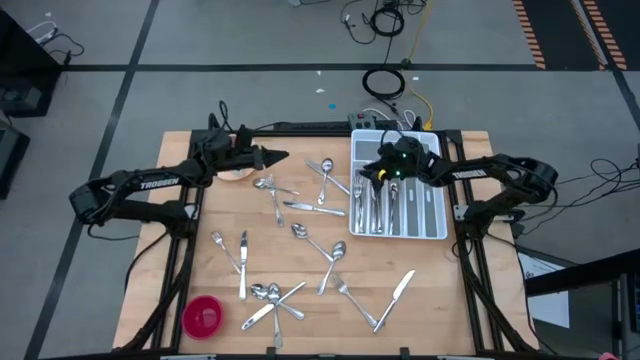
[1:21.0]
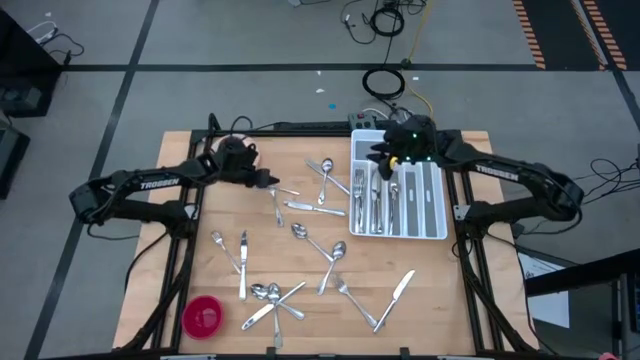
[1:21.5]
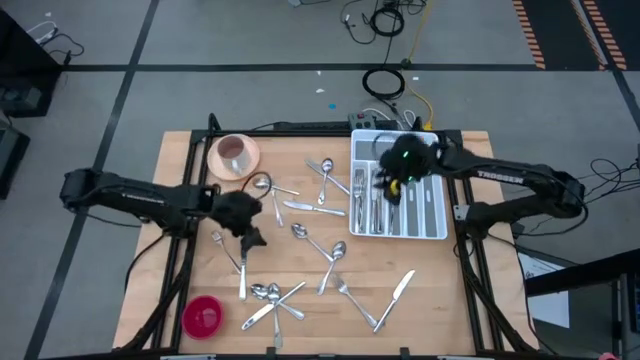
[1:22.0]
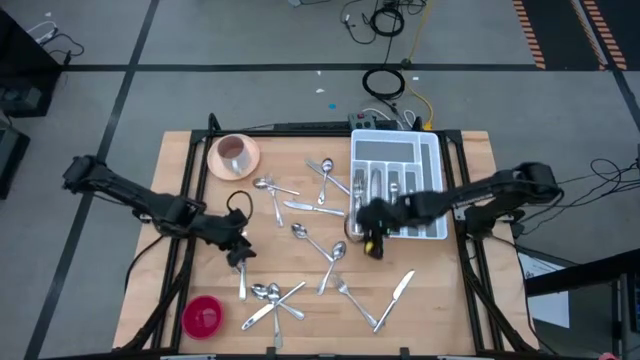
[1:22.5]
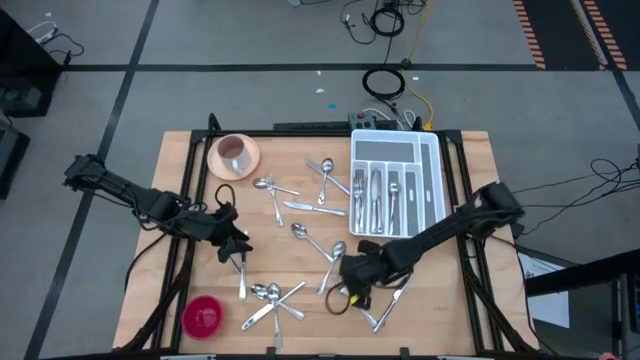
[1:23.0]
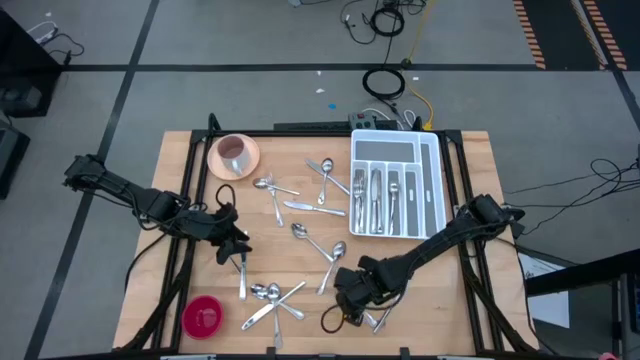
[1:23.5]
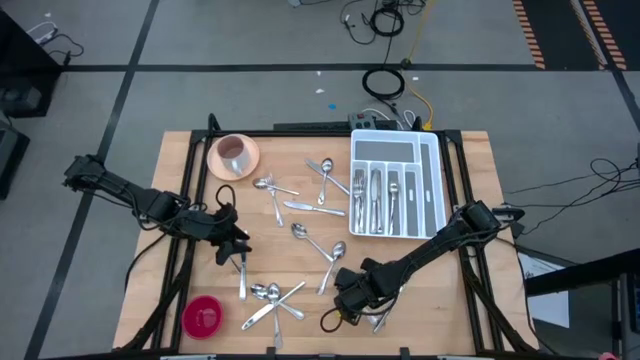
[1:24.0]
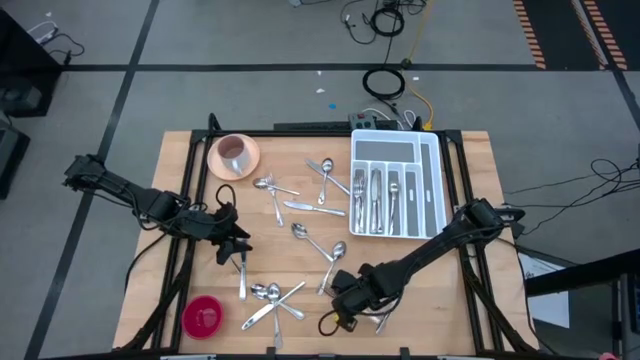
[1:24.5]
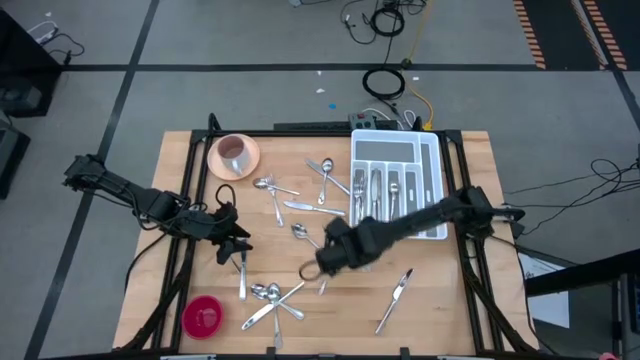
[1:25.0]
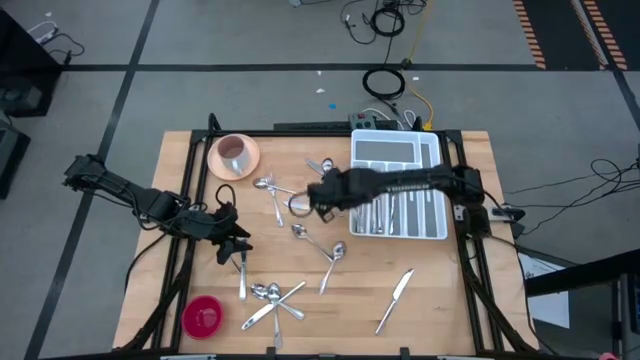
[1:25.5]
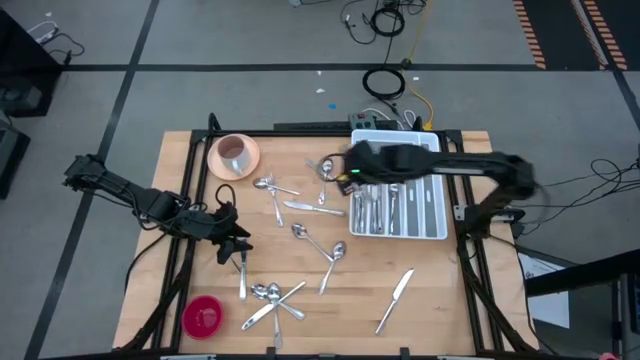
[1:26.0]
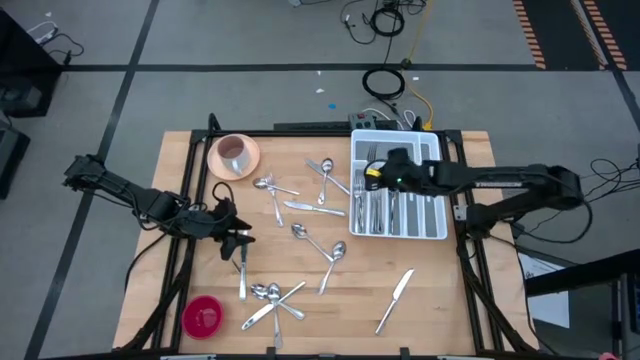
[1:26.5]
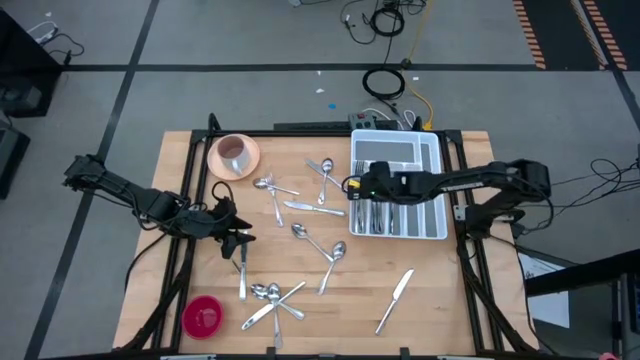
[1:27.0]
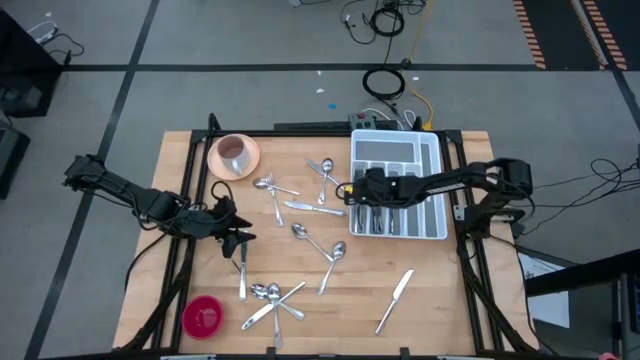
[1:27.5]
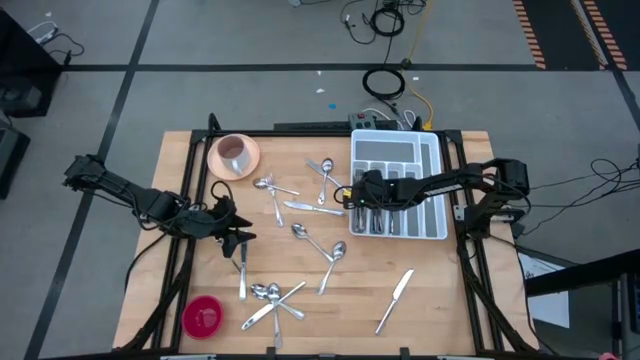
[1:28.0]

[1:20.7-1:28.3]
Task: Sort silverware
Put the bottom silver fork into the white silverware tray

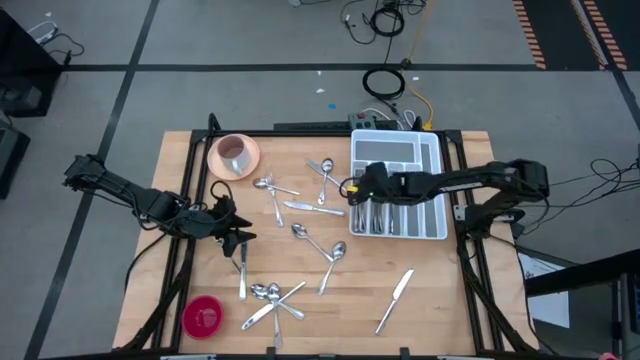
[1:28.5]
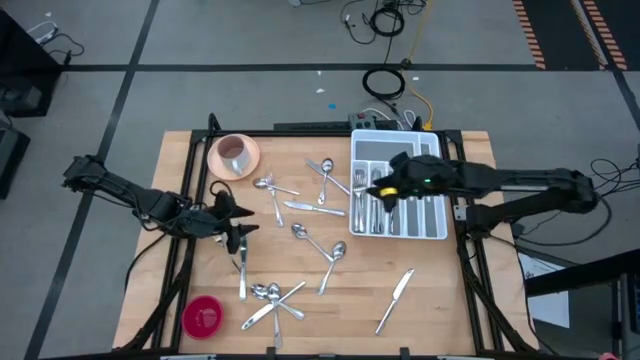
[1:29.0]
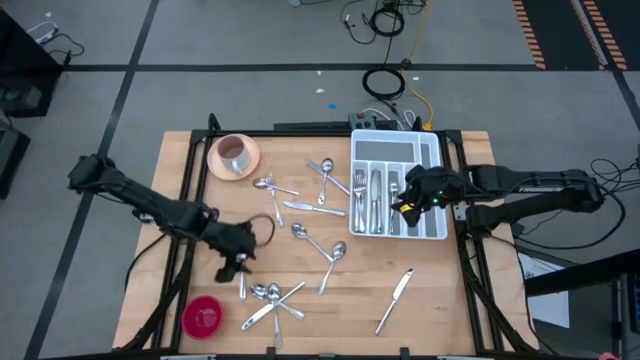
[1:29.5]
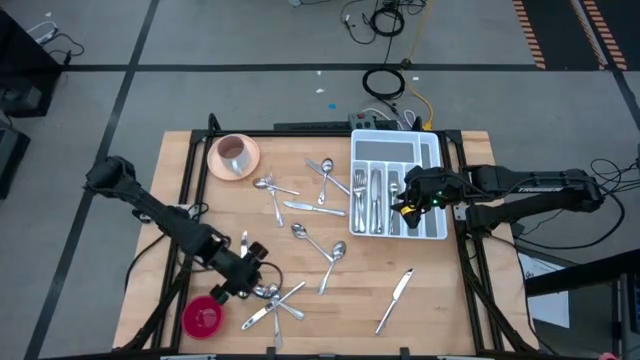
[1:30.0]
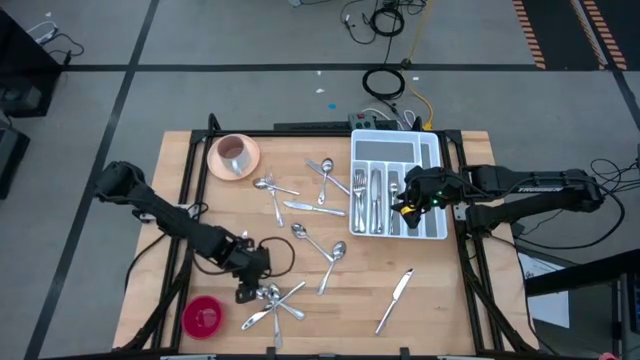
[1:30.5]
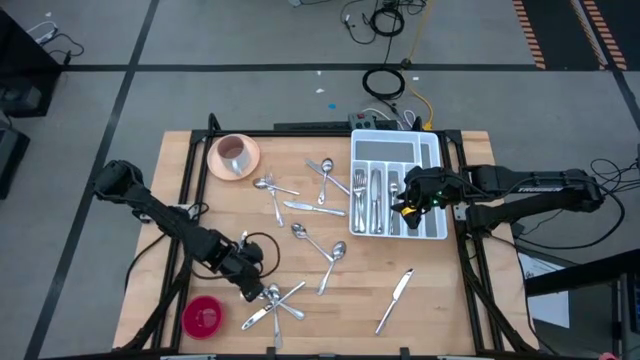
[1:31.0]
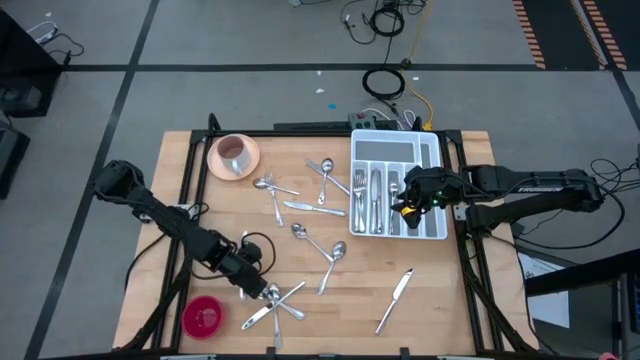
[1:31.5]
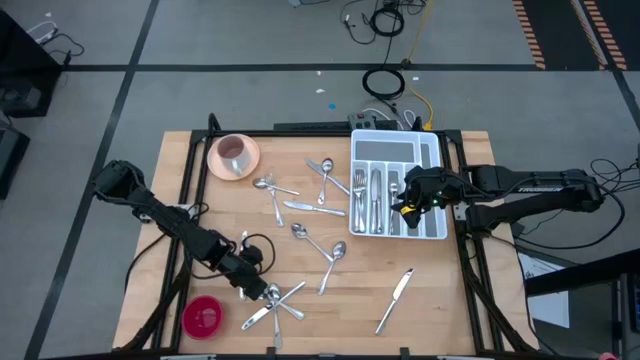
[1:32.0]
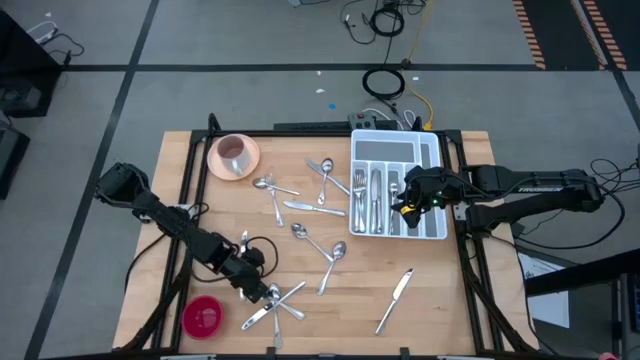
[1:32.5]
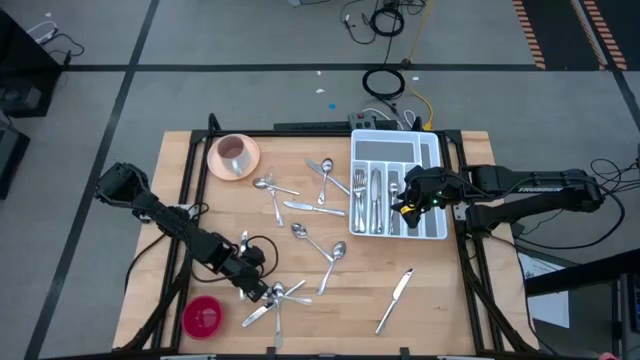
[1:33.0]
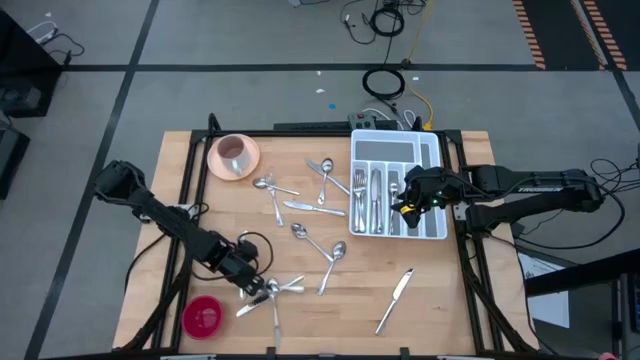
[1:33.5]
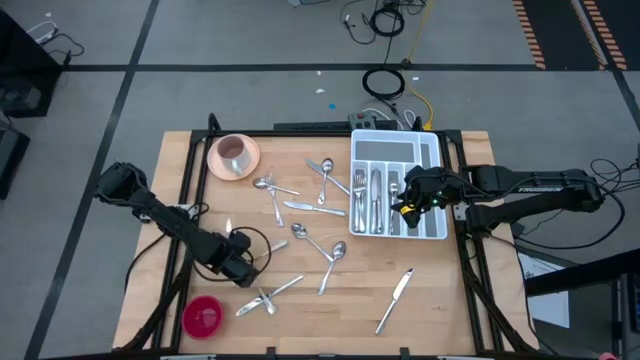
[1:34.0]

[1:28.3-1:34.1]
Put the silver spoon into the white silverware tray

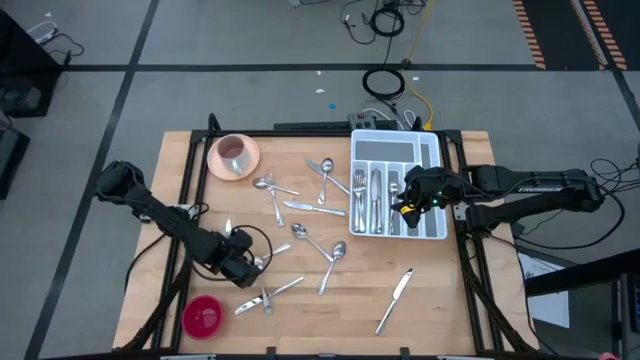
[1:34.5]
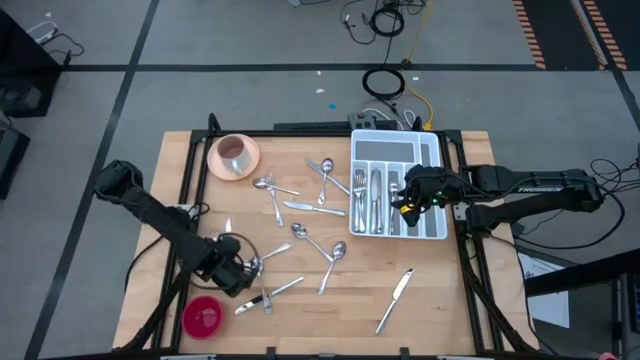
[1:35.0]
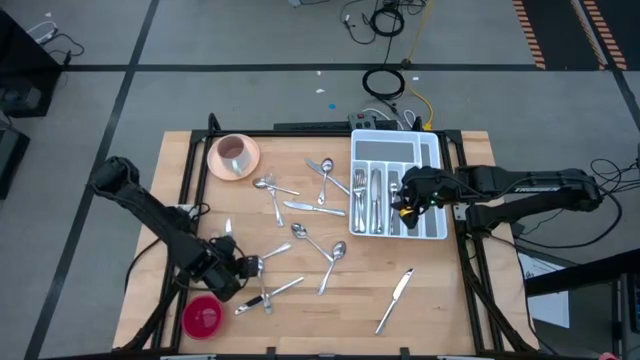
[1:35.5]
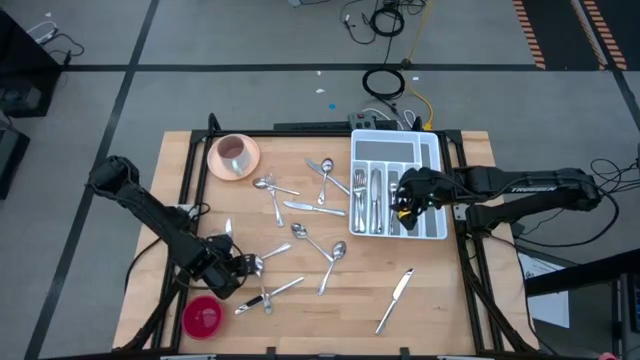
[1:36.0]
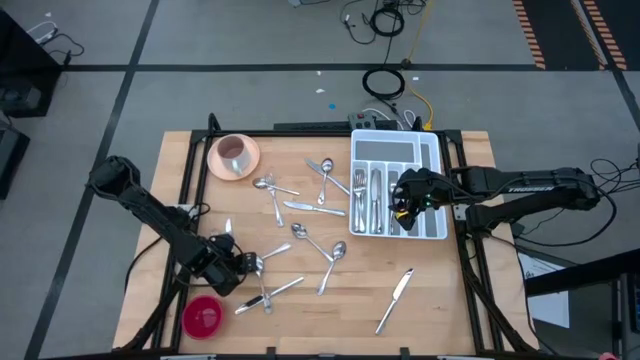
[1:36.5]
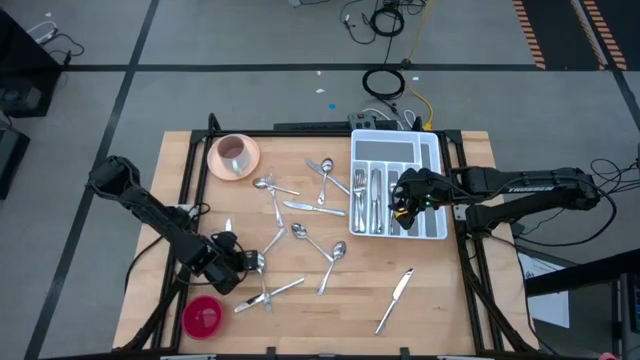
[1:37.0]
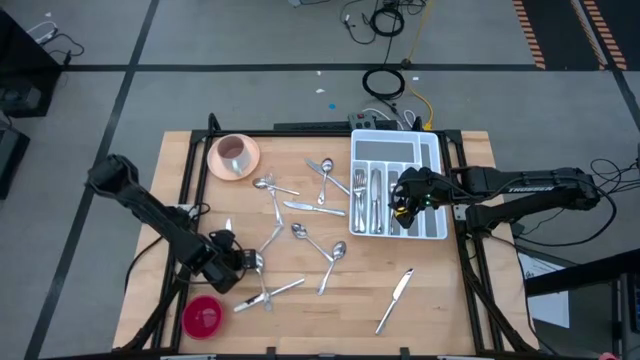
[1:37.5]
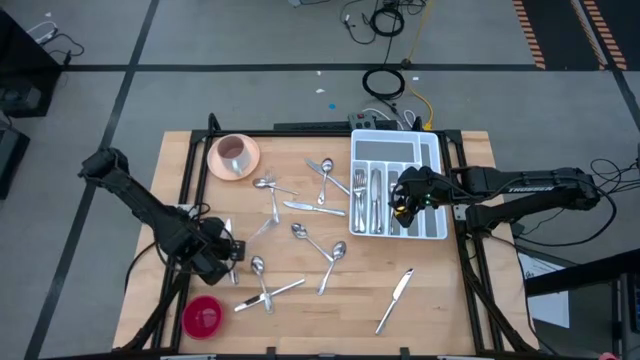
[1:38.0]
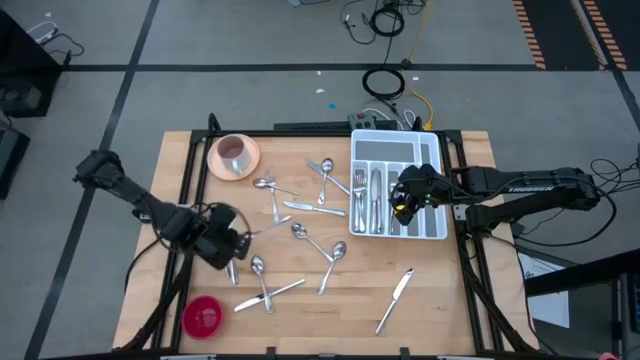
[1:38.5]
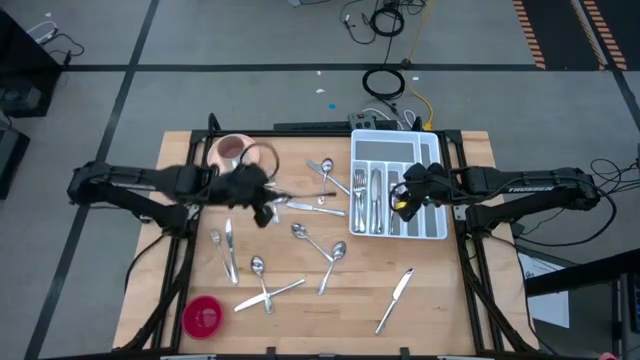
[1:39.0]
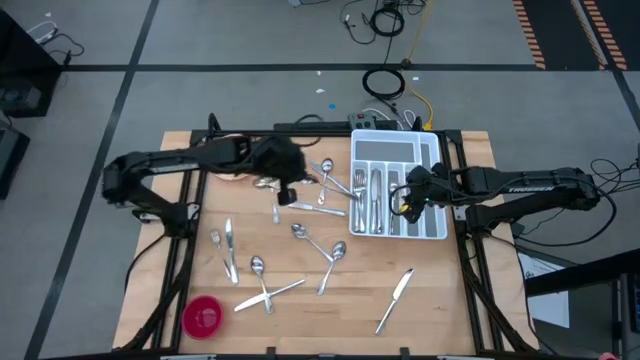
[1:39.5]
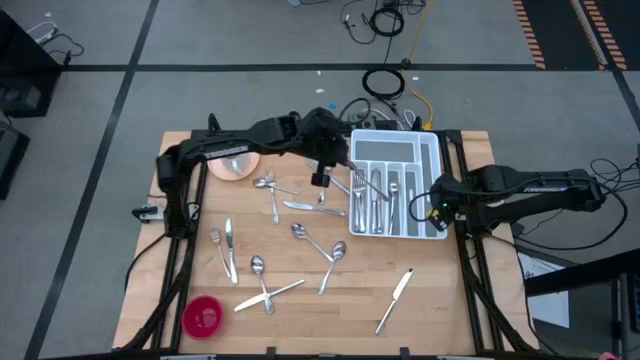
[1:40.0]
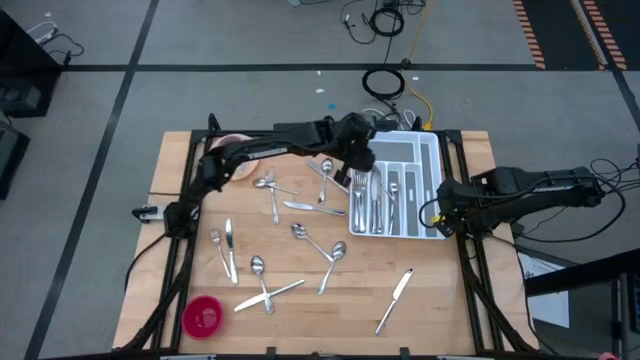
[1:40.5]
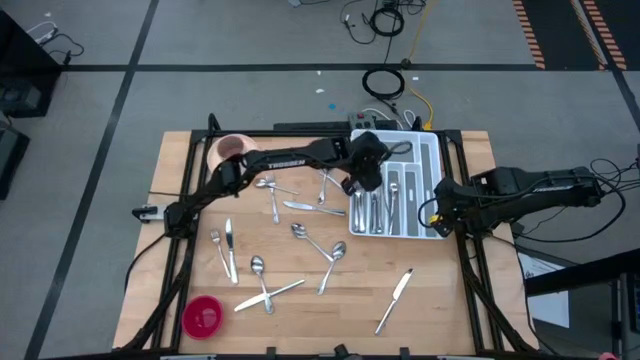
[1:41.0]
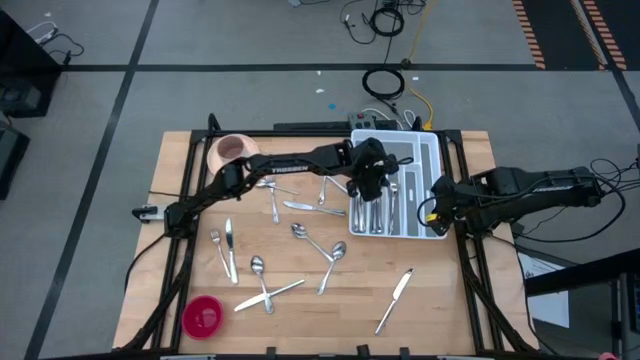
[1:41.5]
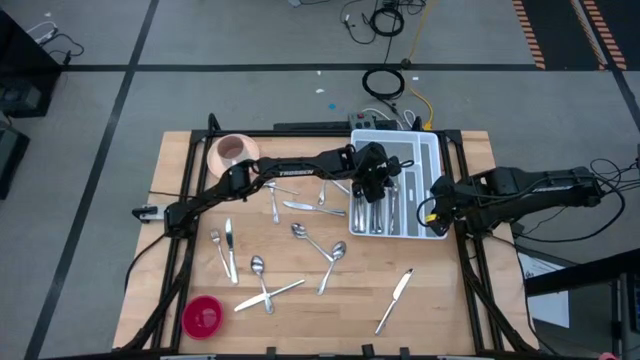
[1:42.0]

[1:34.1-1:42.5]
Put the silver spoon into the white silverware tray
